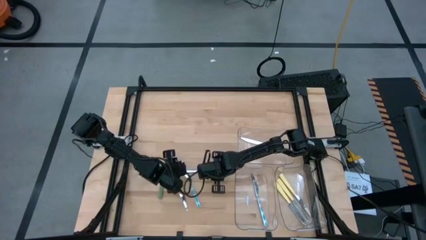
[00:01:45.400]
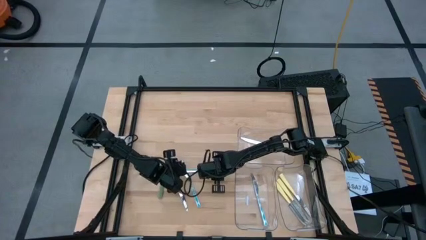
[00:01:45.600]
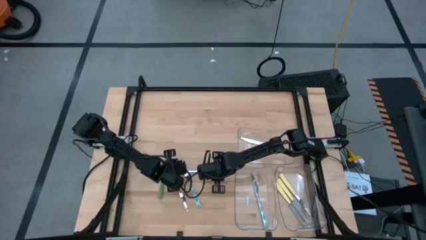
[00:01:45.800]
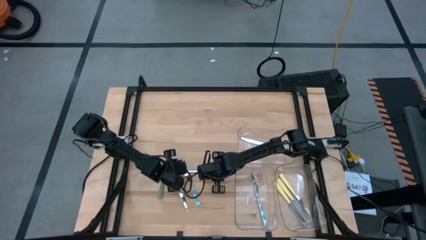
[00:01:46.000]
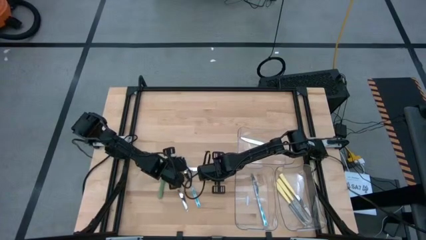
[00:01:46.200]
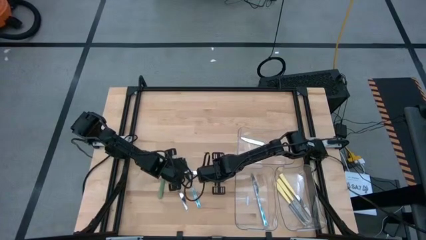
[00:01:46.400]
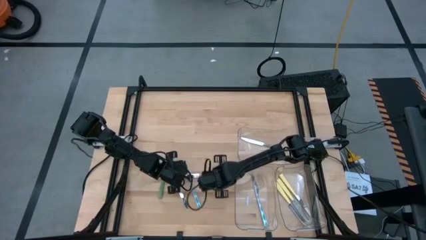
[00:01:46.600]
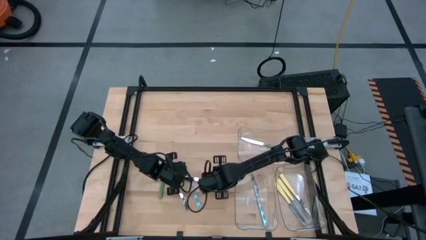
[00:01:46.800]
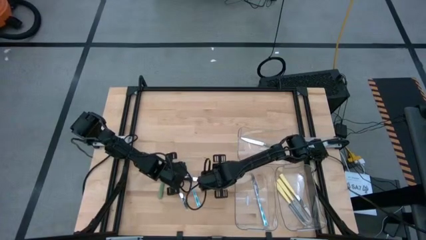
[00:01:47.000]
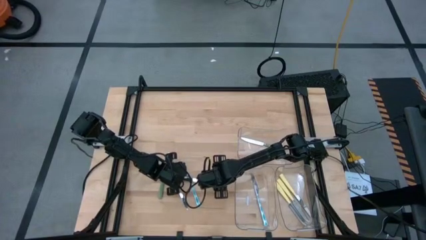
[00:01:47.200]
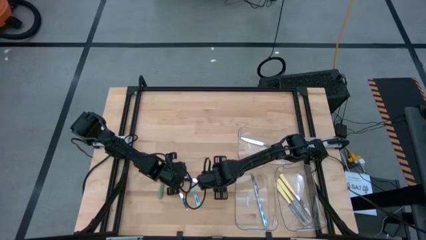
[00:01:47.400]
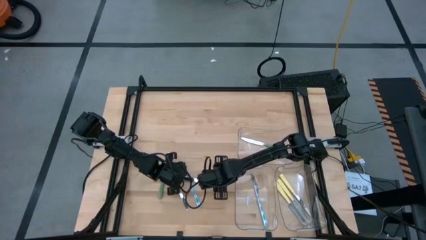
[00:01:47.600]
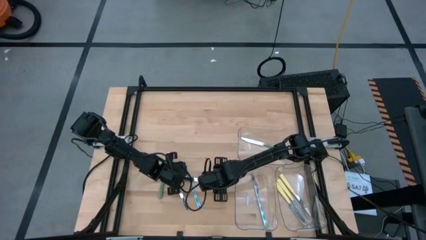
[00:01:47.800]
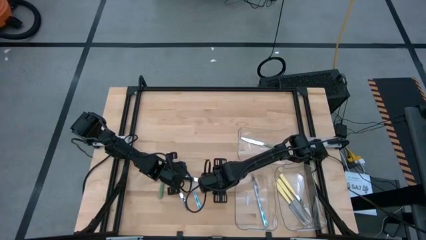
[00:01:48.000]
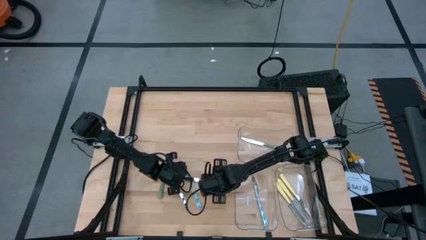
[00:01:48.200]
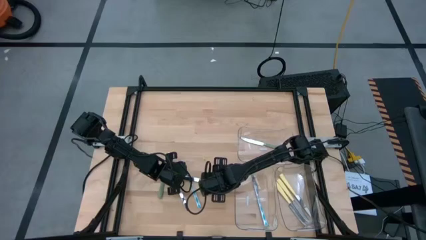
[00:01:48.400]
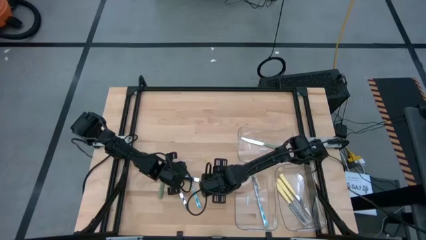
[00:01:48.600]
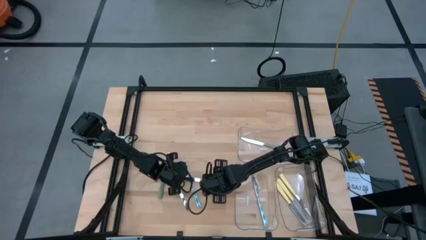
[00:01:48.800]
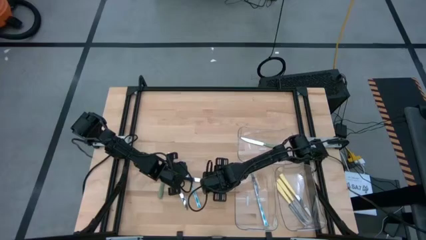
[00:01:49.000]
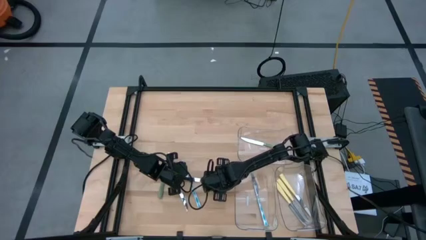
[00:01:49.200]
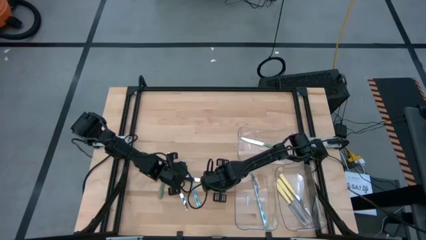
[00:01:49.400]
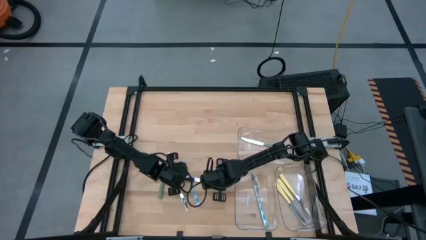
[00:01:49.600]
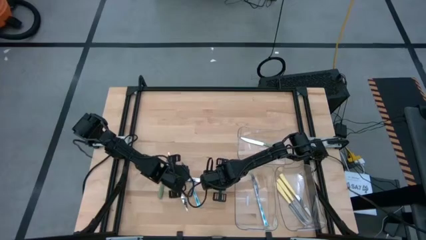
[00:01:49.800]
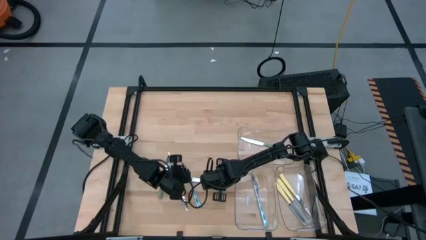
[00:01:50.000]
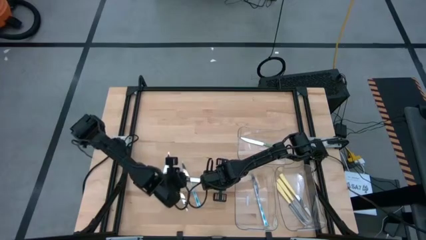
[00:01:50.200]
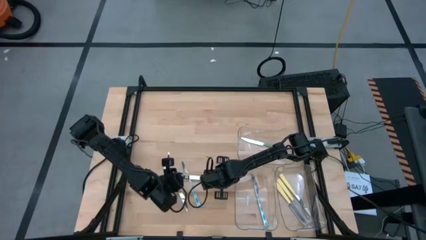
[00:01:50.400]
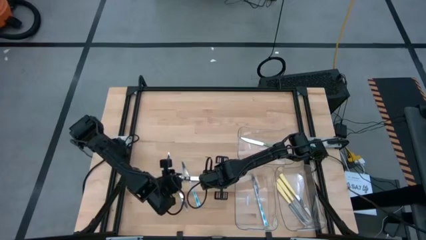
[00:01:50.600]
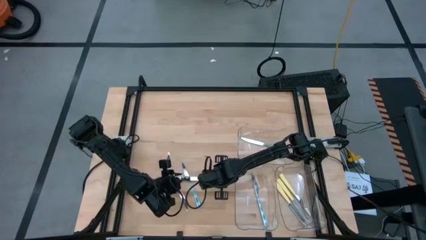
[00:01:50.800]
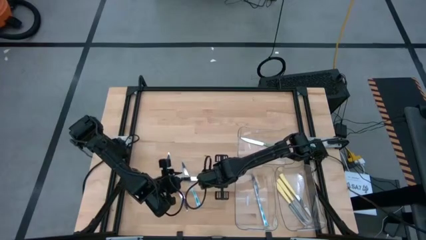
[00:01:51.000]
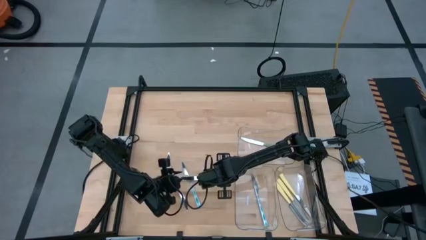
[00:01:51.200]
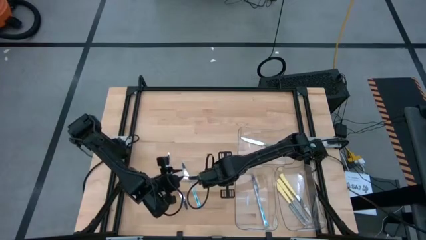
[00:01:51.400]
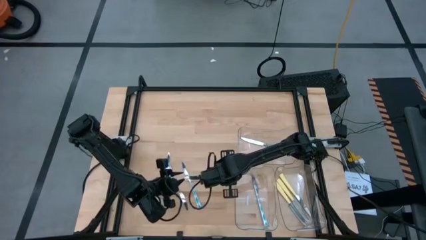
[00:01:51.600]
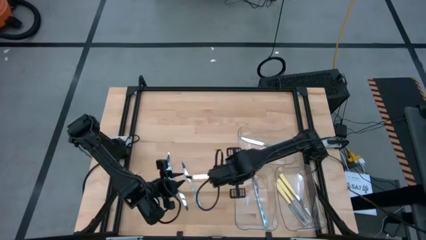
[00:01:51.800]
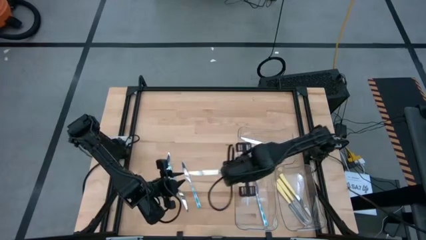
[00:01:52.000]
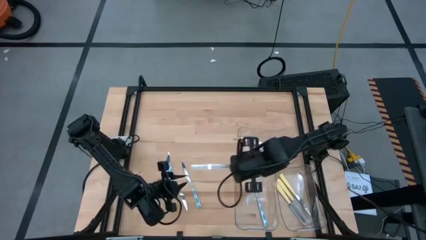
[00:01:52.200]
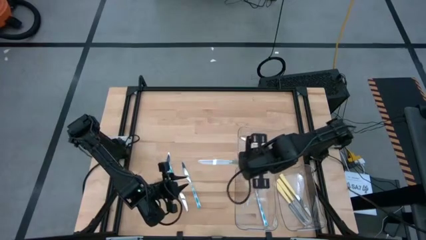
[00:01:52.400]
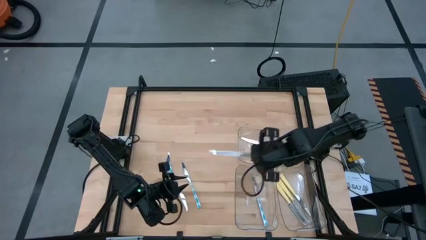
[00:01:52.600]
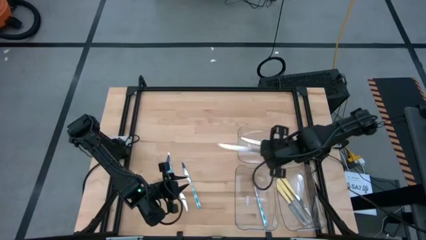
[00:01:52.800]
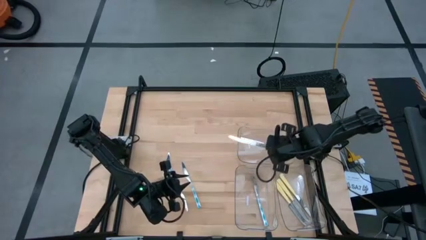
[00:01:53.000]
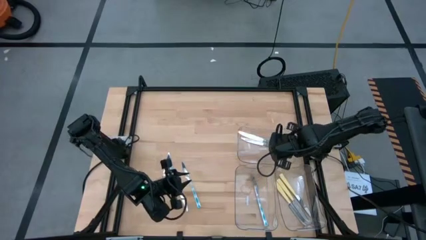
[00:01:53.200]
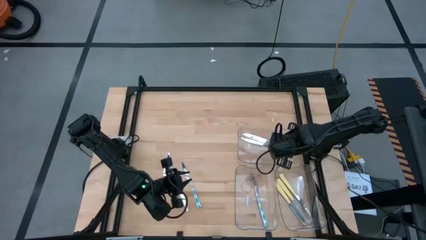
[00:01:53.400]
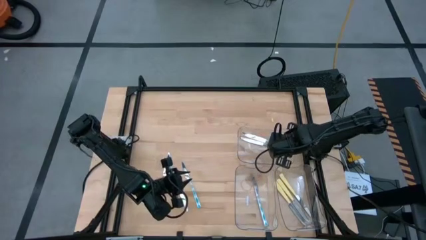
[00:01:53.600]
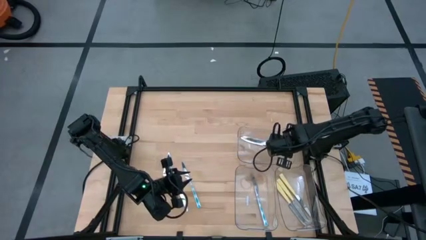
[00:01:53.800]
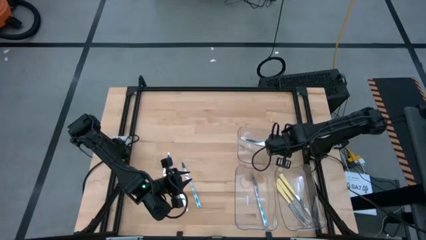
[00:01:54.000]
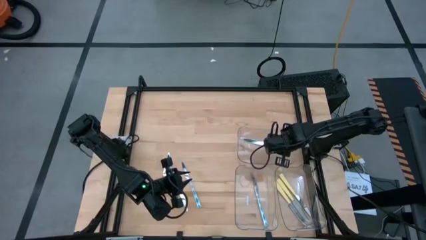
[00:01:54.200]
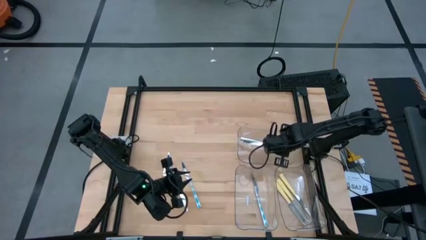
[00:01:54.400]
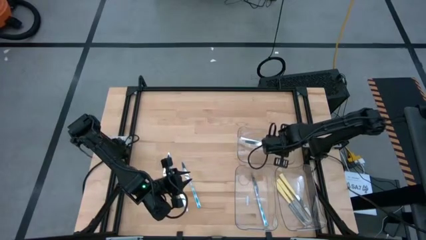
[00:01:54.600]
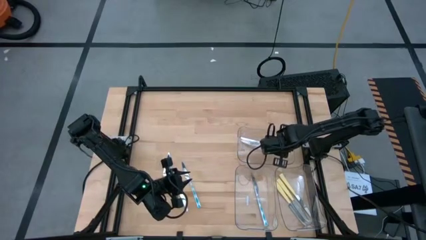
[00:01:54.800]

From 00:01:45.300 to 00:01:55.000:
Task: Sort silverware by color (type)
Put the green knife into the top transparent bin

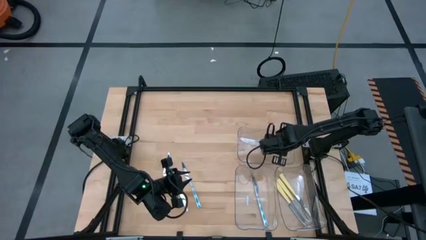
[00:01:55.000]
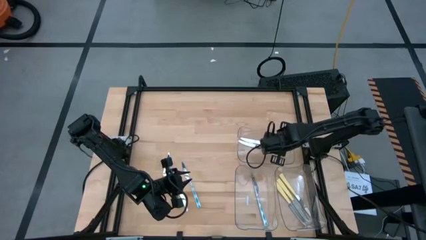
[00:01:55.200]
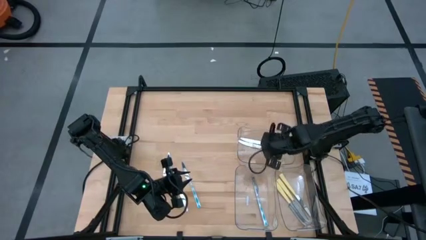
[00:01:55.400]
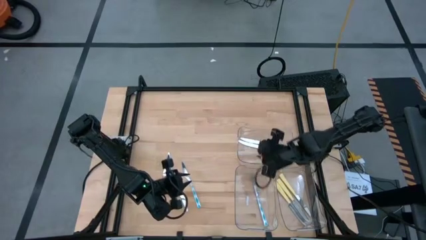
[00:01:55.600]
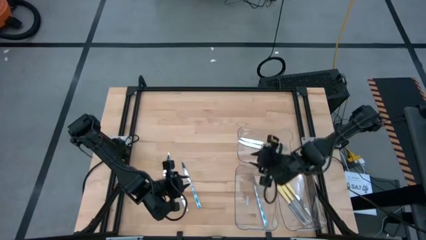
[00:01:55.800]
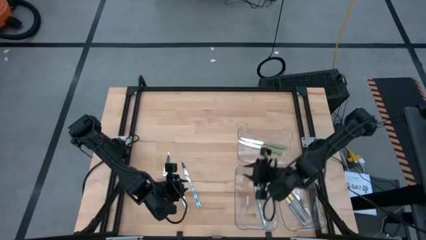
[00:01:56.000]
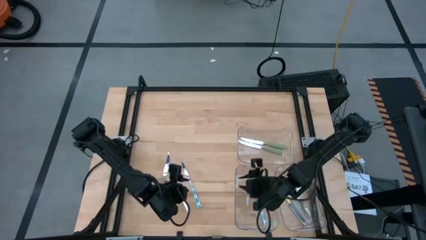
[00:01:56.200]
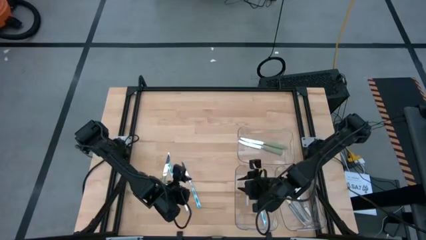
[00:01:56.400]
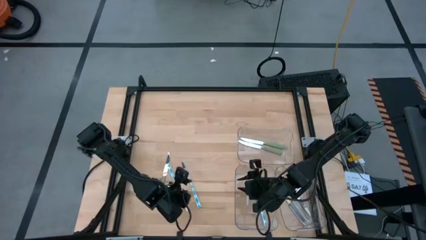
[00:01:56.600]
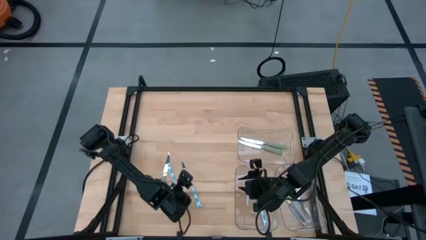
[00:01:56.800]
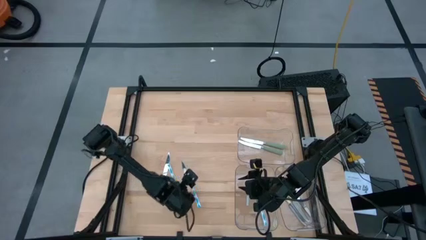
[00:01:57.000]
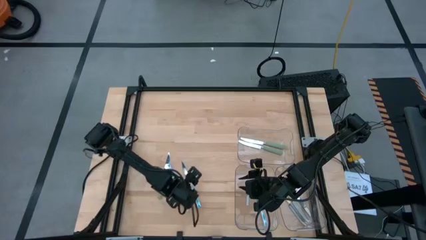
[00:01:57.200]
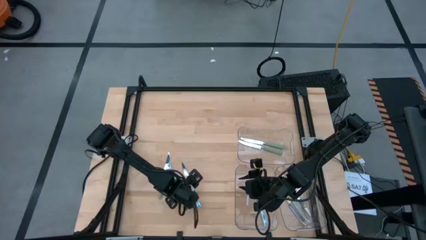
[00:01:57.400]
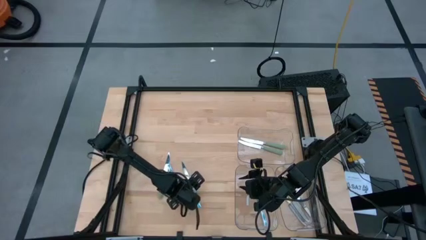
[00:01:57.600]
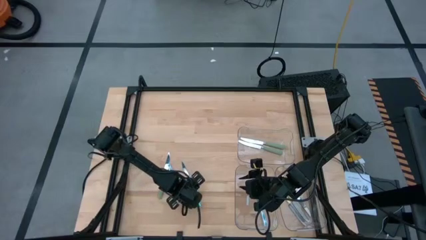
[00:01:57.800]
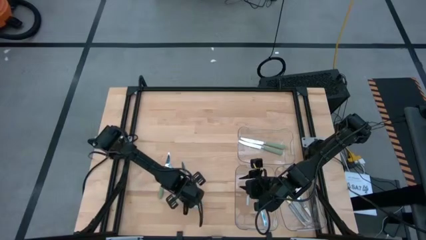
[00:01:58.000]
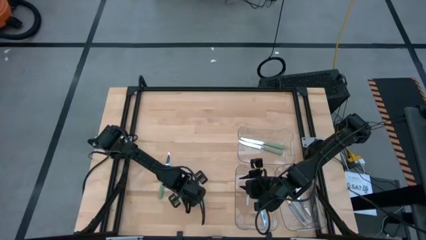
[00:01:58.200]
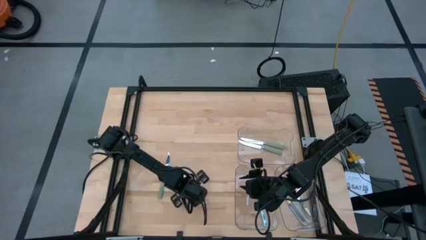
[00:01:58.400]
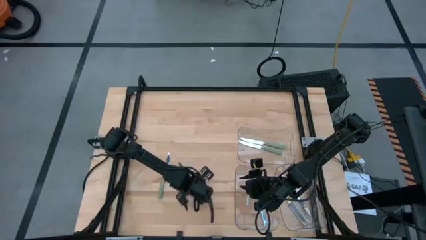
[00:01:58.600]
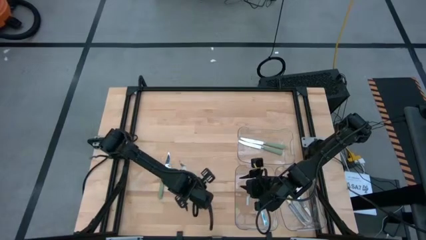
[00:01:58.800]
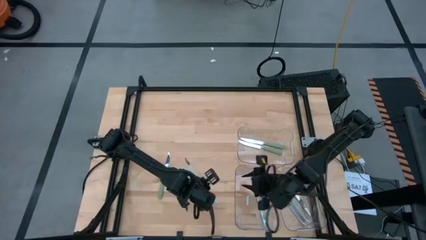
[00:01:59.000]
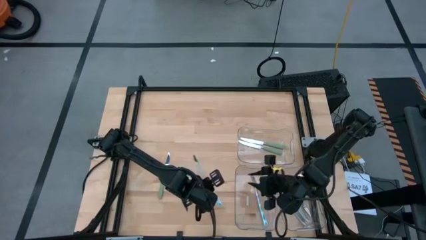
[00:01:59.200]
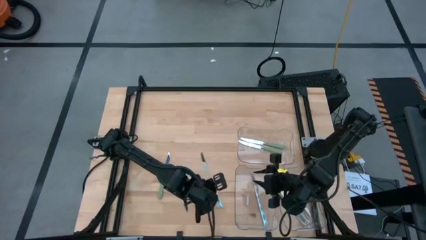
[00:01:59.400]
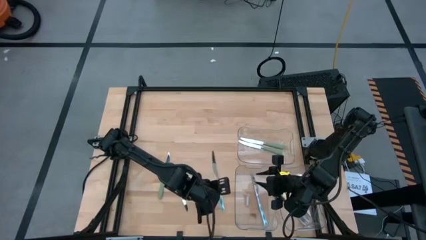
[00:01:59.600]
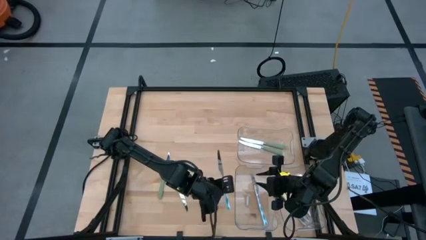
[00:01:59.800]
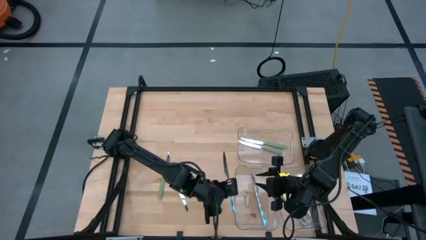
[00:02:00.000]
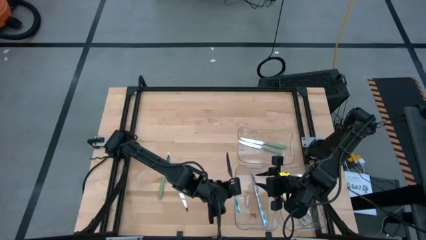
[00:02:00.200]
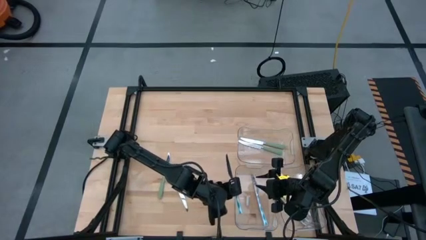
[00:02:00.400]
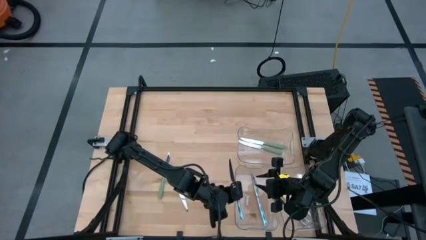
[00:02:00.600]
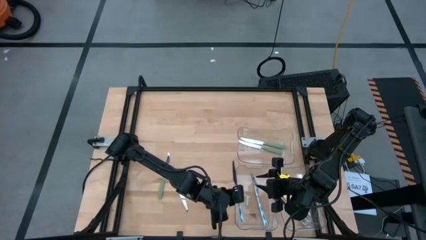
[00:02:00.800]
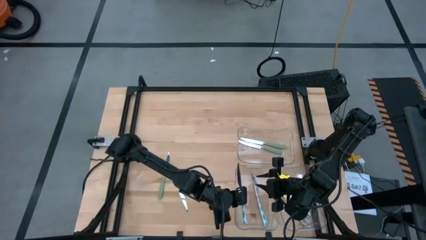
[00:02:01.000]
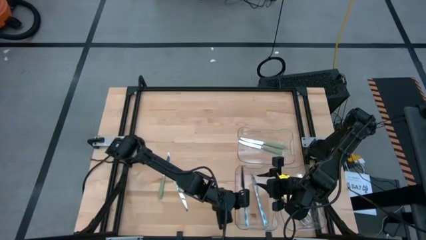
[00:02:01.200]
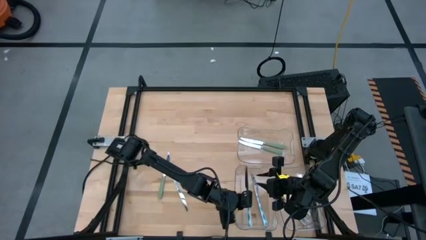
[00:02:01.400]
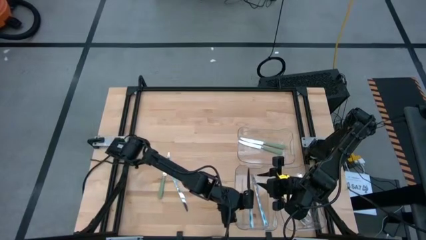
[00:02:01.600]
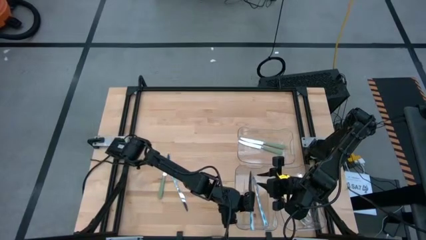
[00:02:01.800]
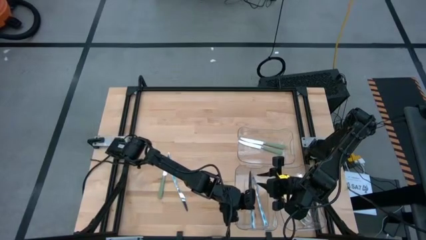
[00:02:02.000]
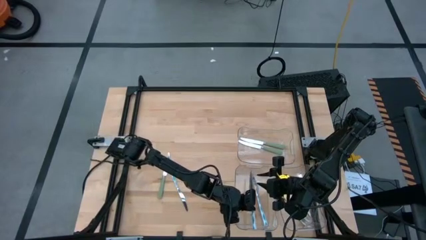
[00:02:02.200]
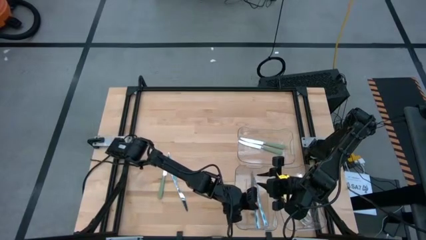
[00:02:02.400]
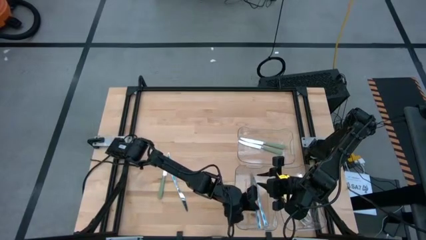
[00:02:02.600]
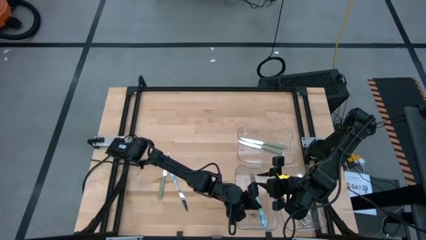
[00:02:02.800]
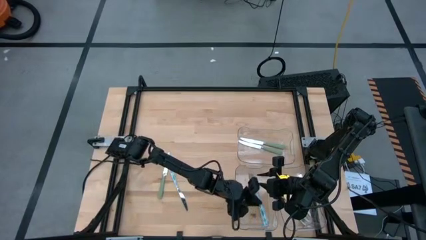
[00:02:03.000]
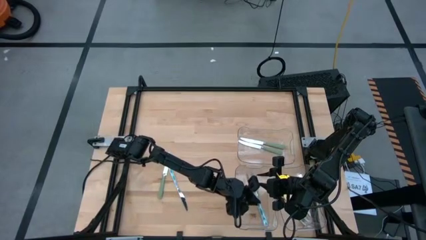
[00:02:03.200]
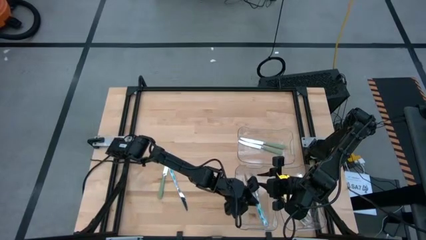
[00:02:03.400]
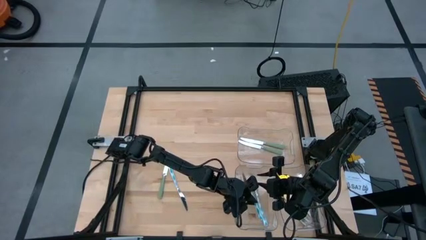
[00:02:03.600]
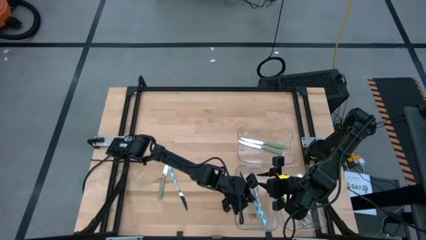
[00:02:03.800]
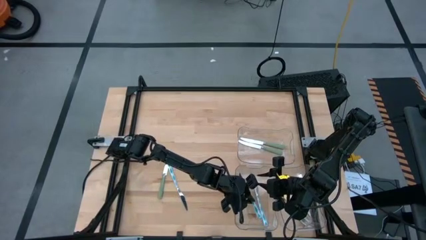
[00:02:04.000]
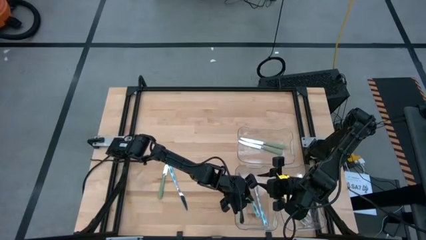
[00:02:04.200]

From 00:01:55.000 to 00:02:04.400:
Put the blue knife into the bottom left transparent bin
